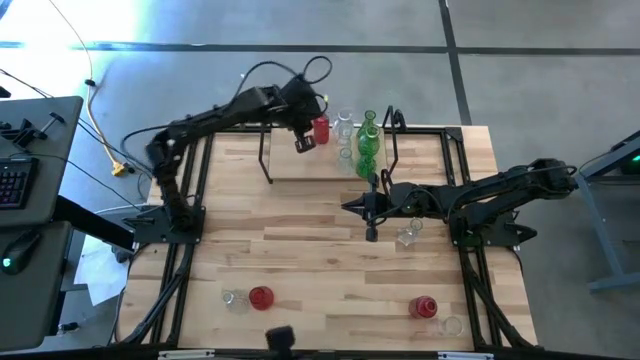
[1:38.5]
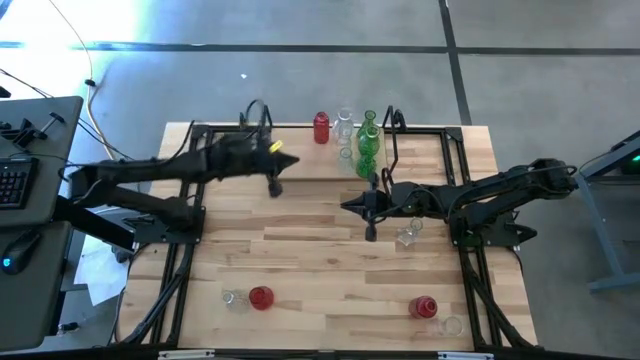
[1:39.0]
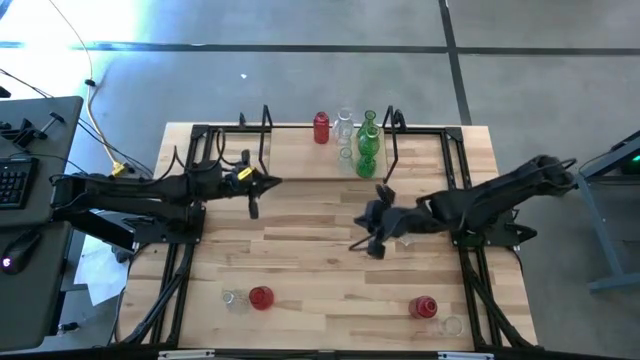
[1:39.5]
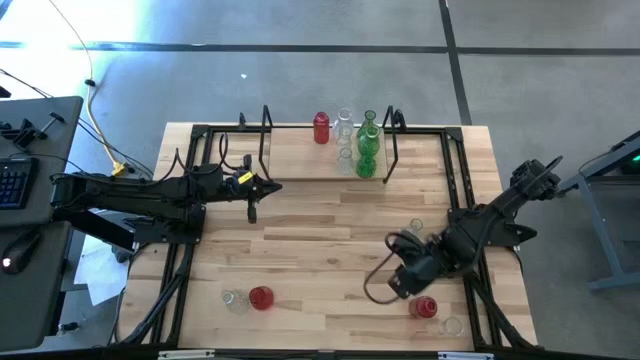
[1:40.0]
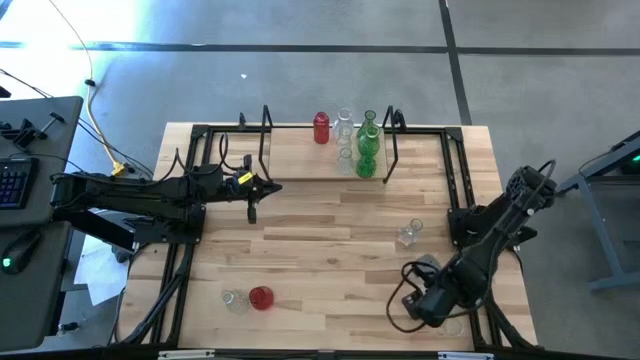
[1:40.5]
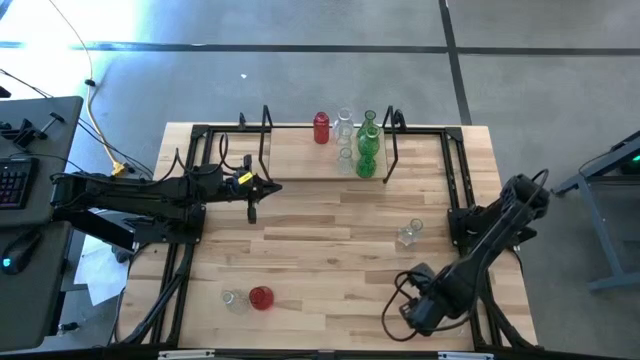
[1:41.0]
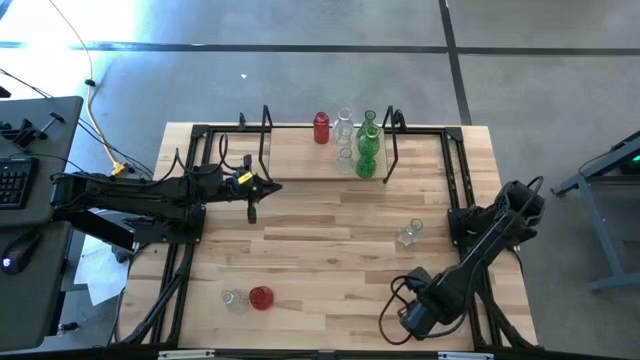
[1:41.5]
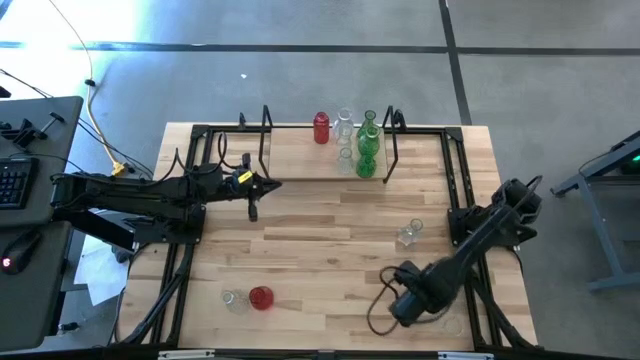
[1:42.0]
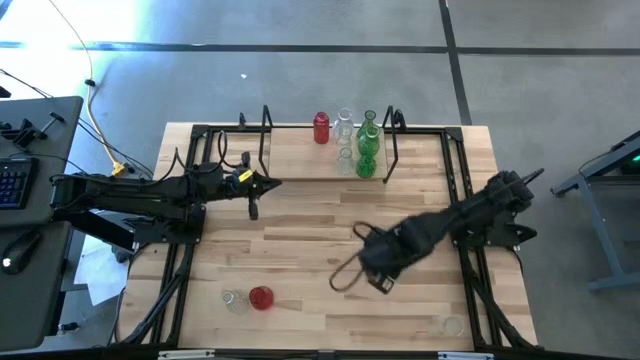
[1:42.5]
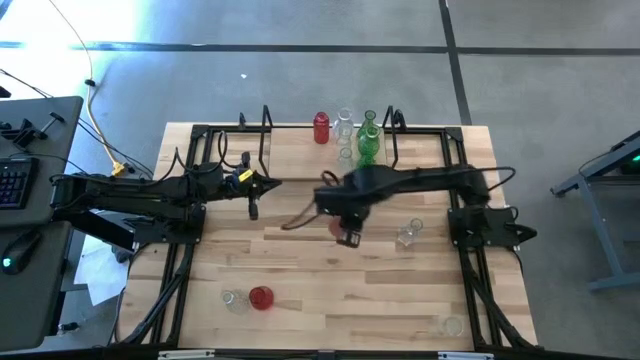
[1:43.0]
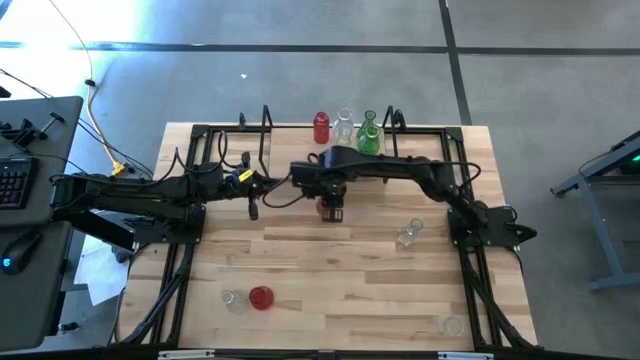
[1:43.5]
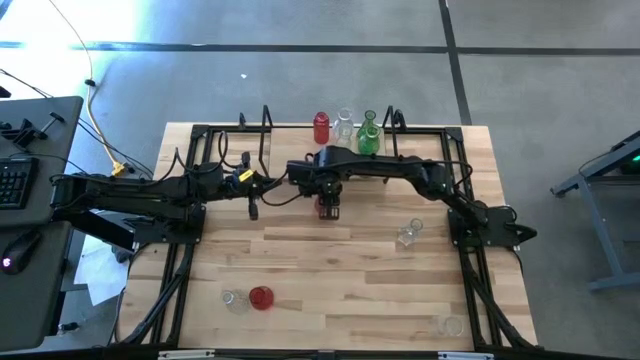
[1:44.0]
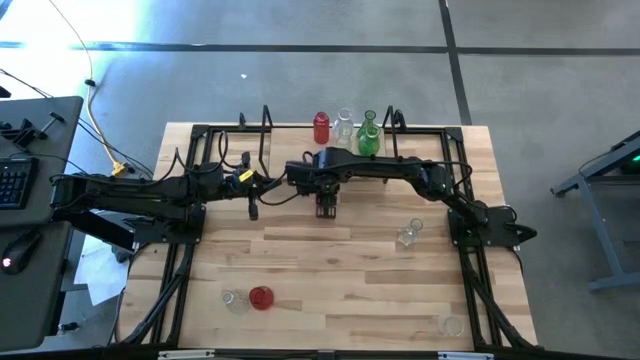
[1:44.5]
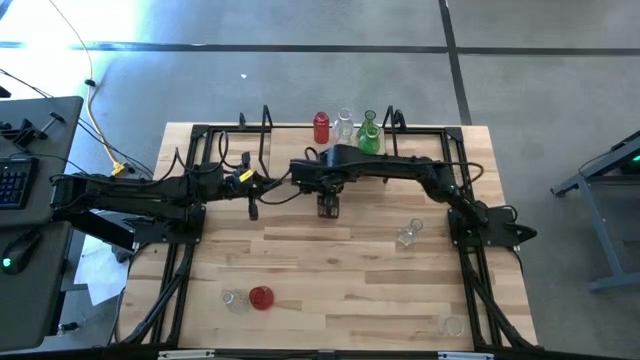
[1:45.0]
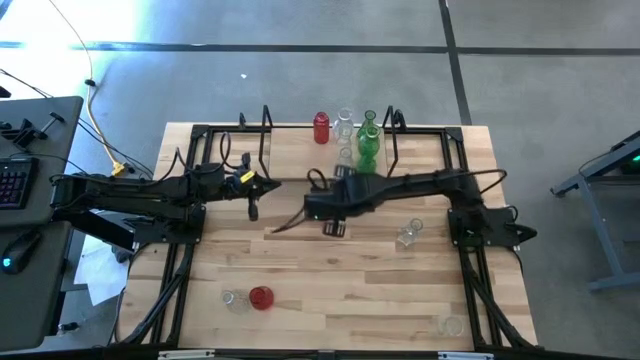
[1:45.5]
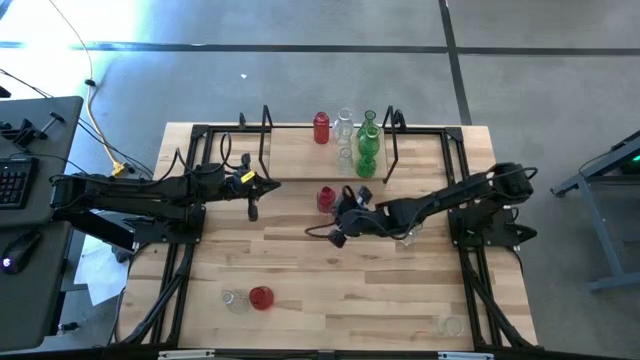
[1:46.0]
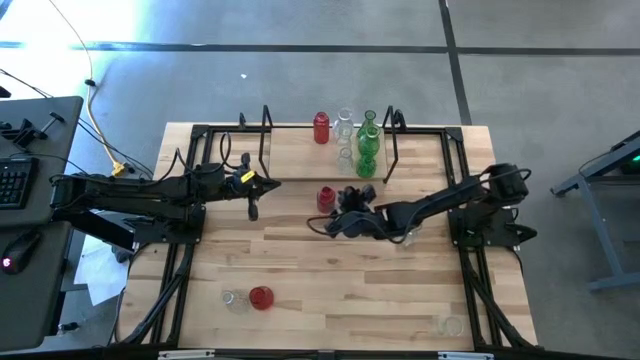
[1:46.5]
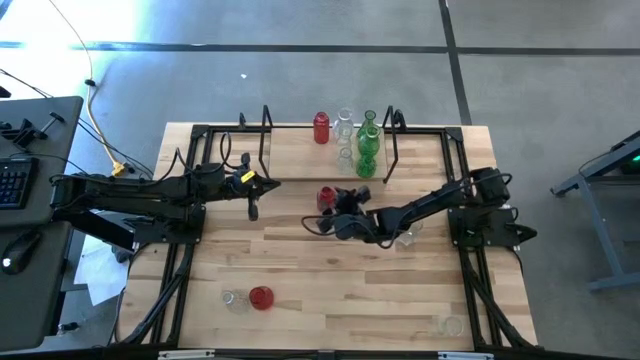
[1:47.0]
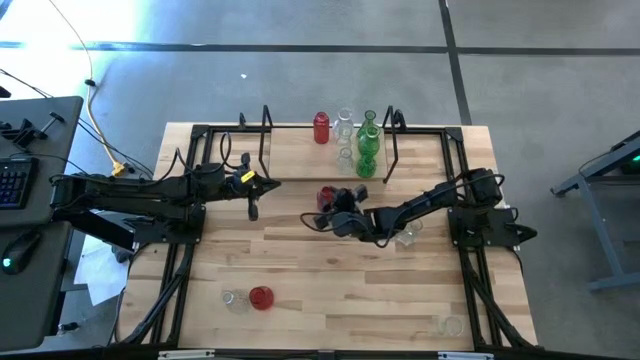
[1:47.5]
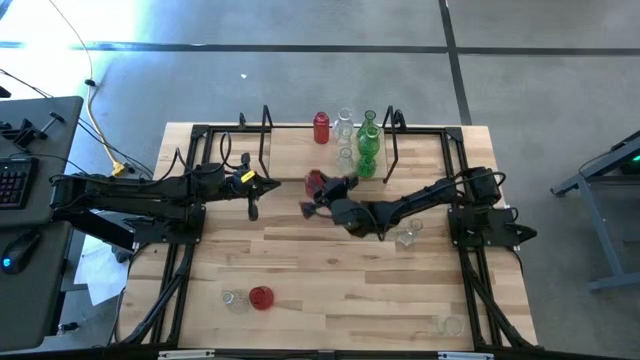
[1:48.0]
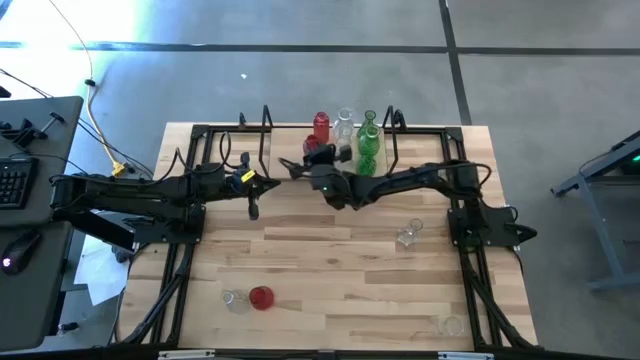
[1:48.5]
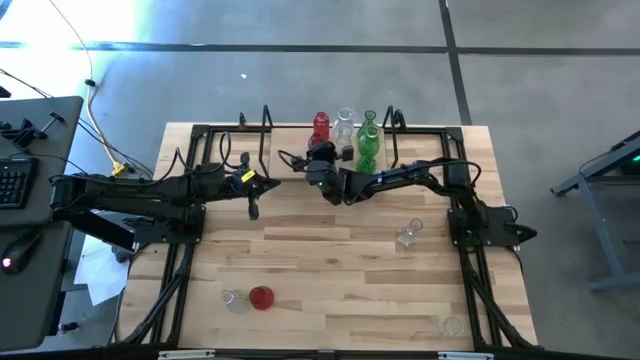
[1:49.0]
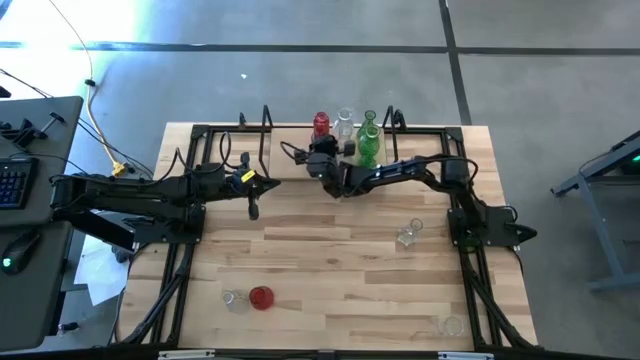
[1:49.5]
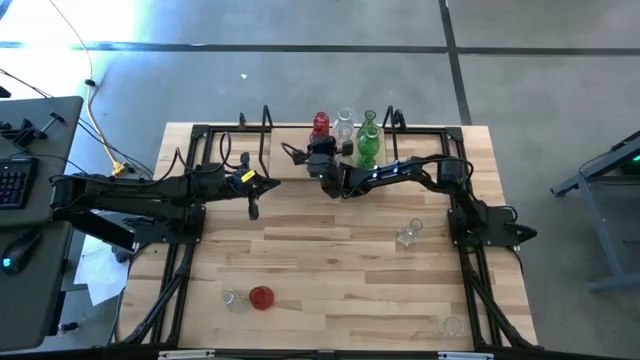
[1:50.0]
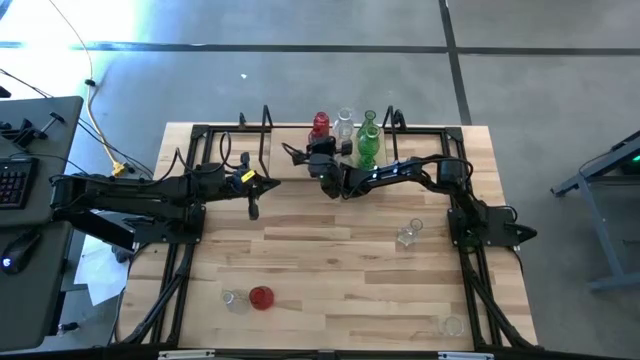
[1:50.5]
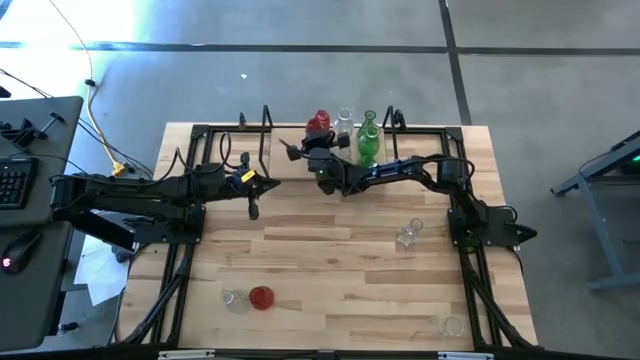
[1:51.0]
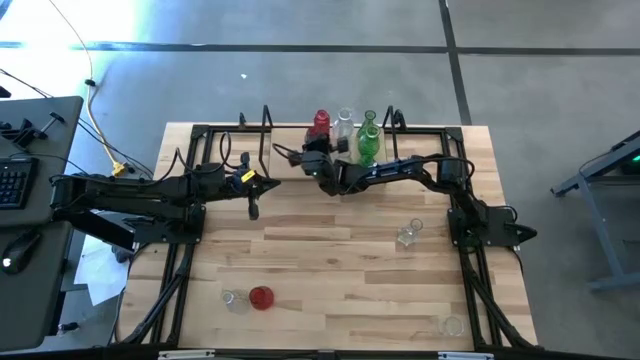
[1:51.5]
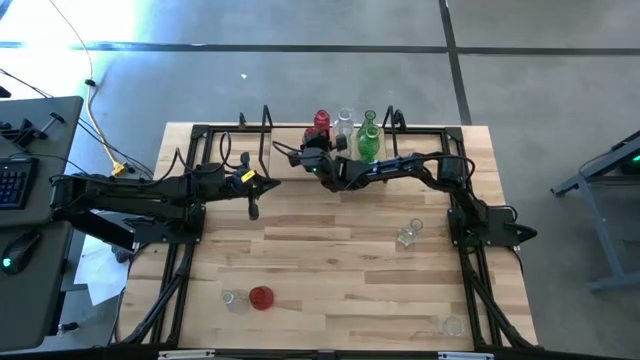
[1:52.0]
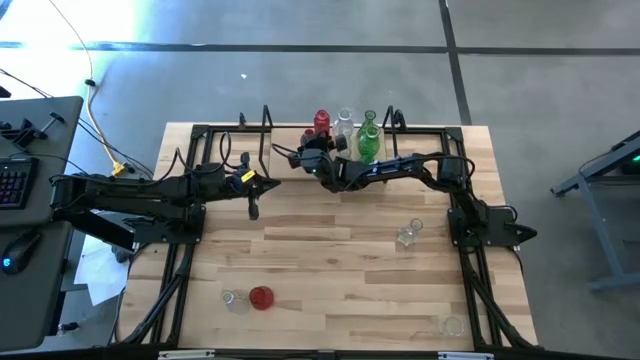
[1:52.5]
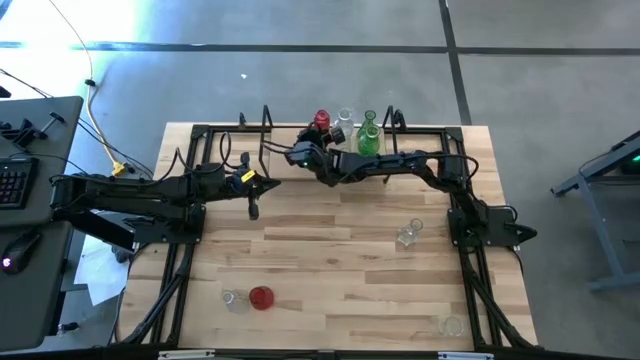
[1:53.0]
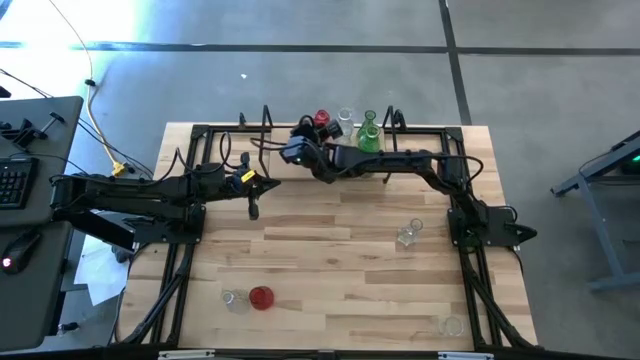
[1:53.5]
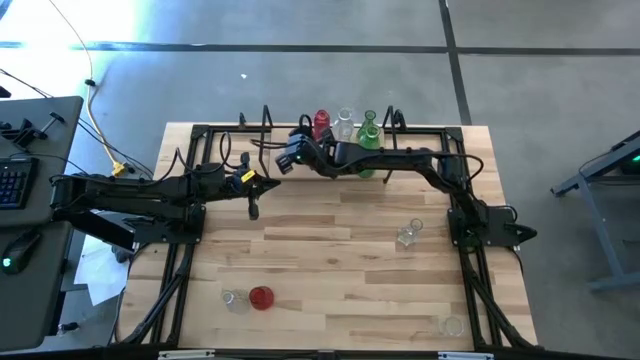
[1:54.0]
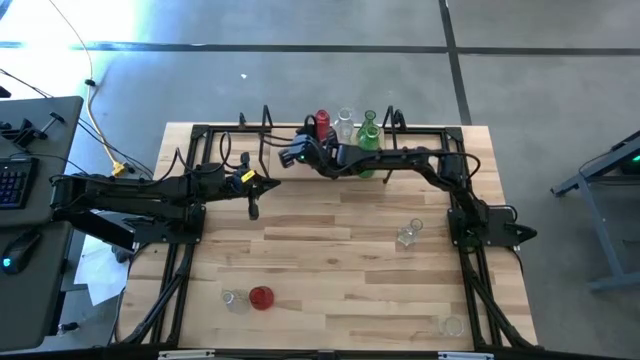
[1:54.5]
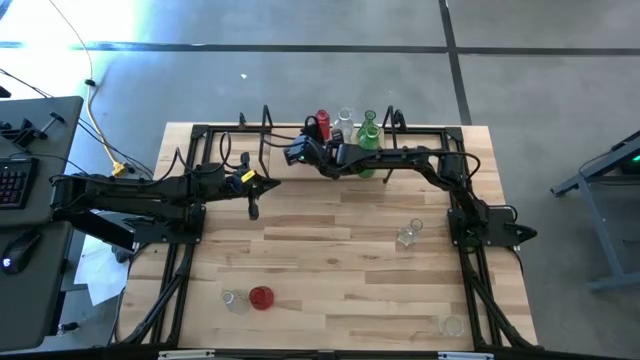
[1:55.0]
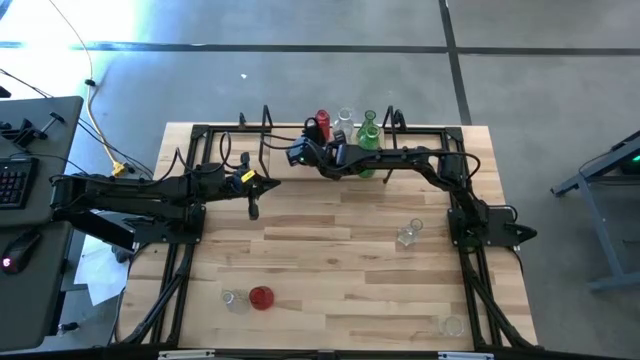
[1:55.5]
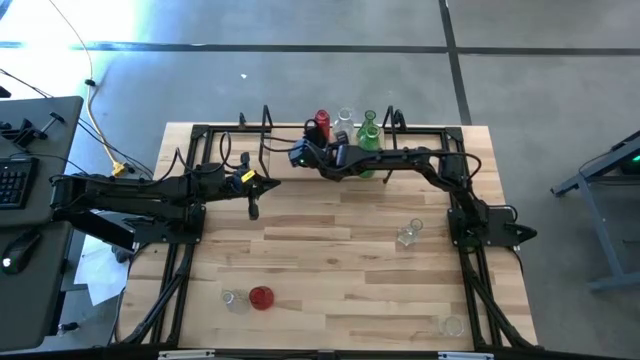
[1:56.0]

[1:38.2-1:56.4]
Task: sort vases onto shelf
Put the right red vase aligned with the other red vase on the shelf
